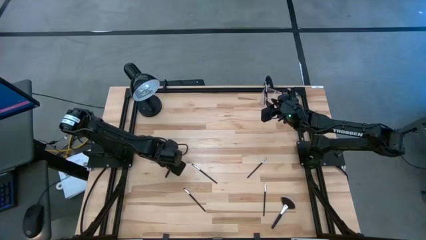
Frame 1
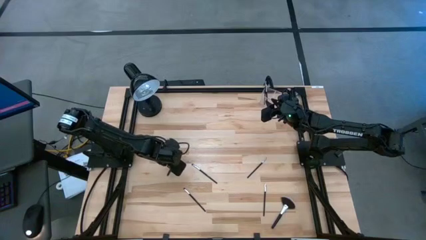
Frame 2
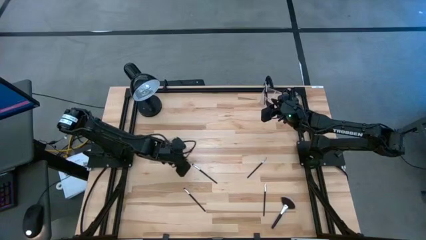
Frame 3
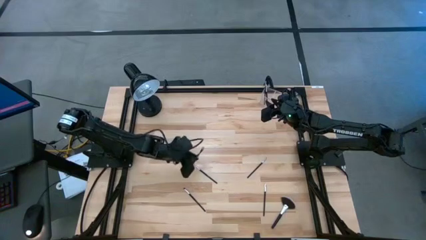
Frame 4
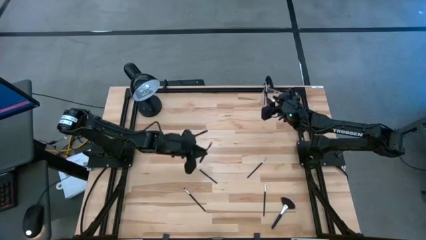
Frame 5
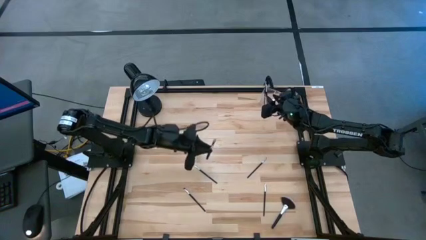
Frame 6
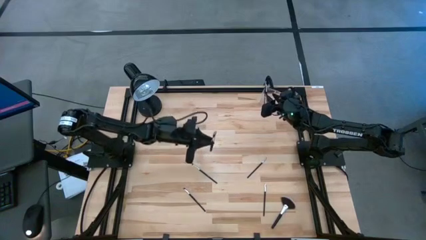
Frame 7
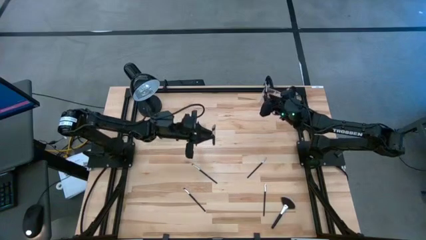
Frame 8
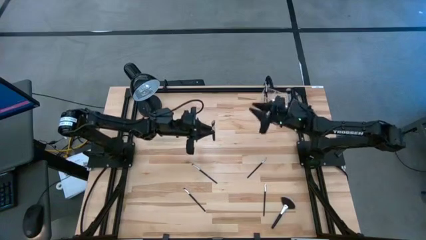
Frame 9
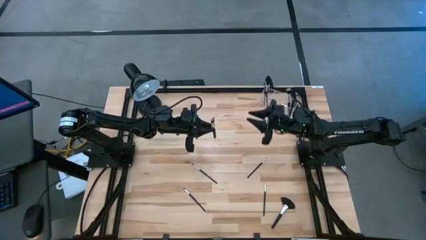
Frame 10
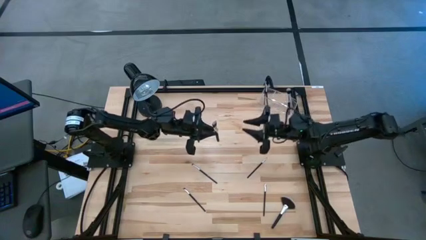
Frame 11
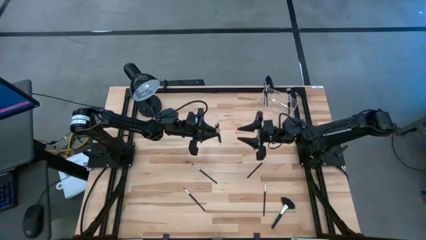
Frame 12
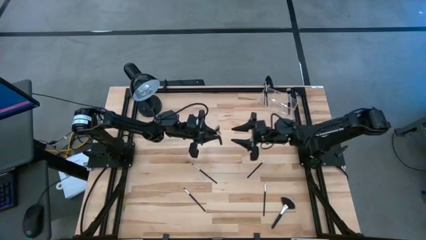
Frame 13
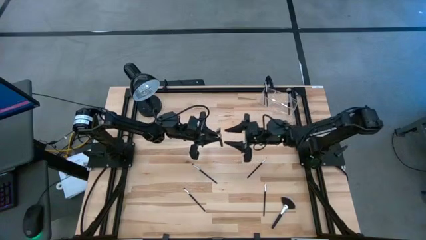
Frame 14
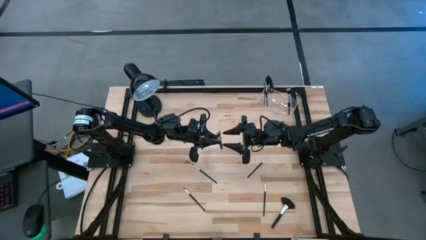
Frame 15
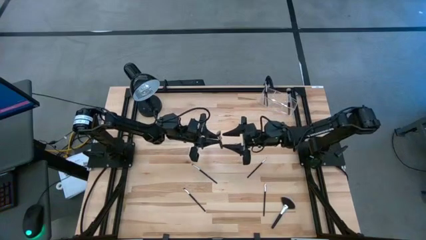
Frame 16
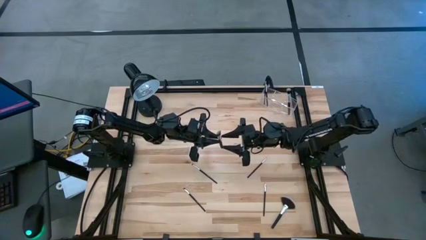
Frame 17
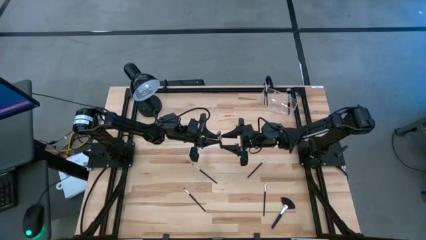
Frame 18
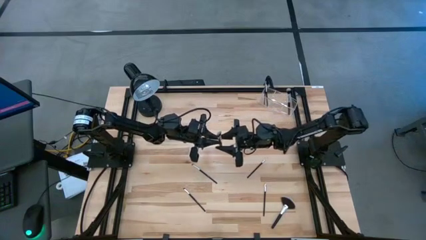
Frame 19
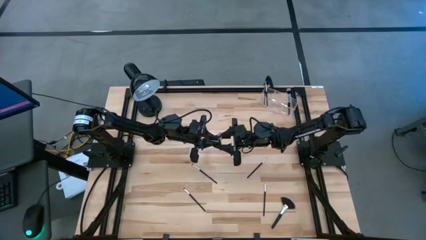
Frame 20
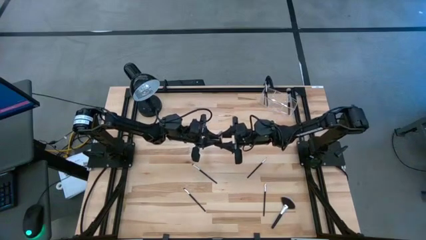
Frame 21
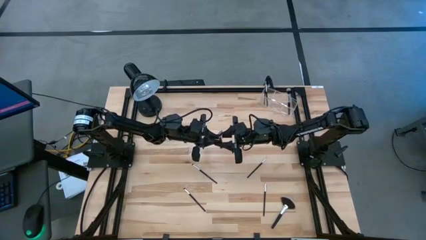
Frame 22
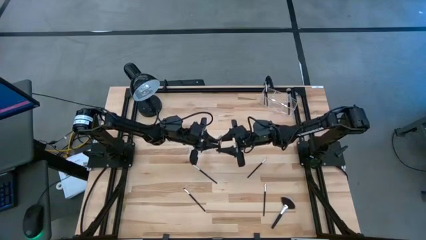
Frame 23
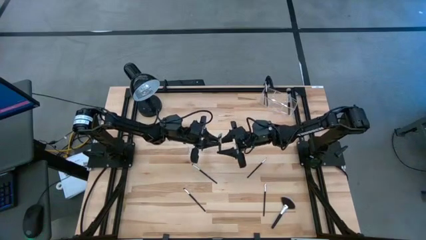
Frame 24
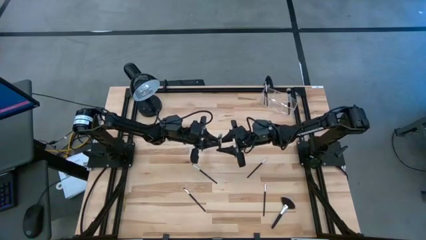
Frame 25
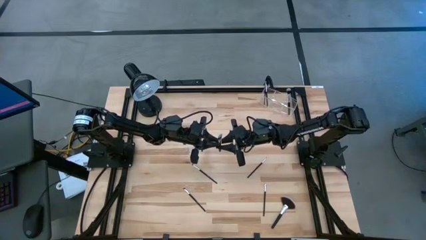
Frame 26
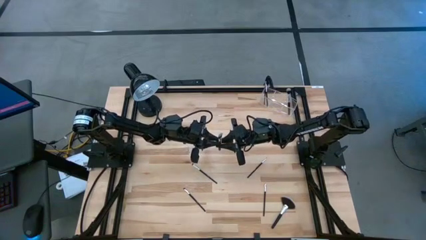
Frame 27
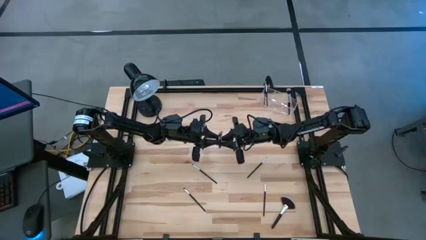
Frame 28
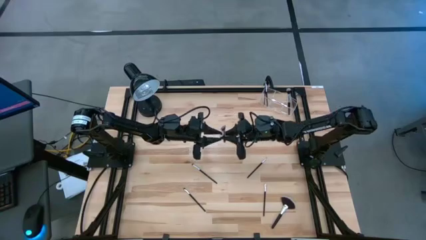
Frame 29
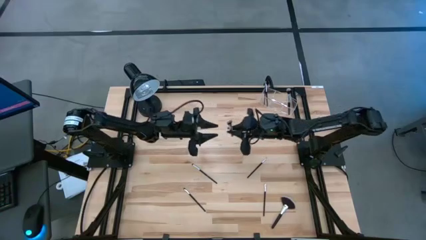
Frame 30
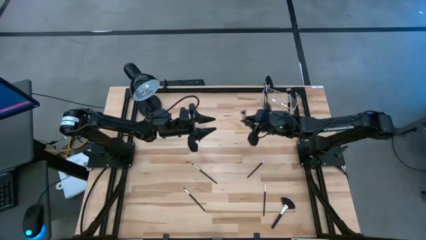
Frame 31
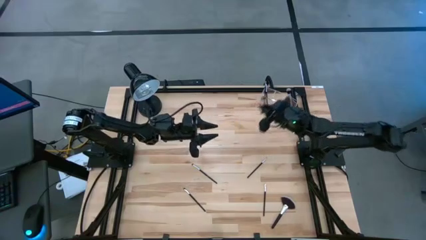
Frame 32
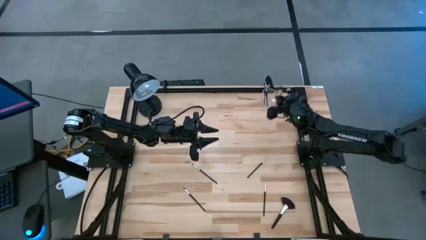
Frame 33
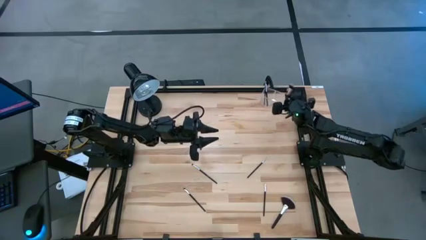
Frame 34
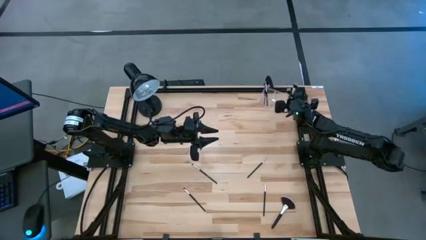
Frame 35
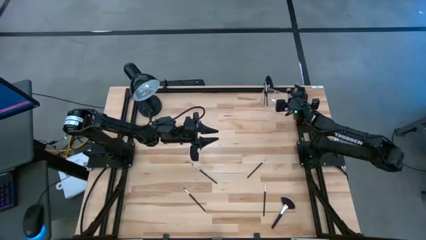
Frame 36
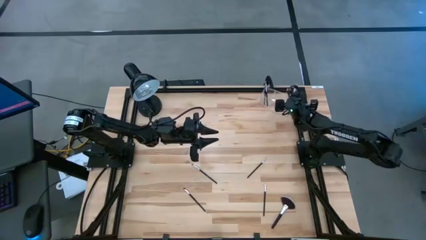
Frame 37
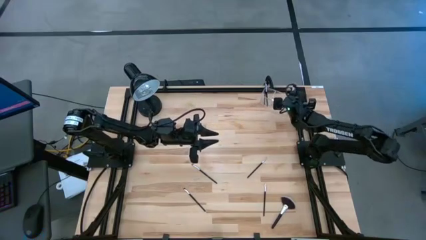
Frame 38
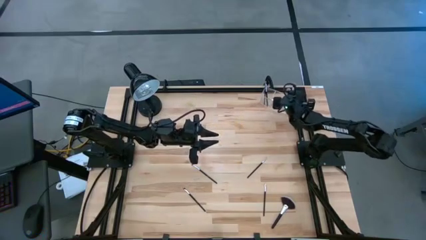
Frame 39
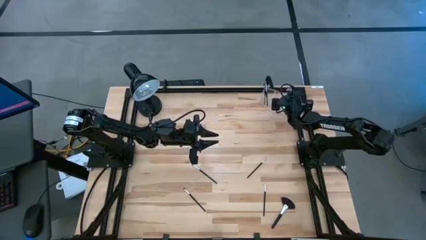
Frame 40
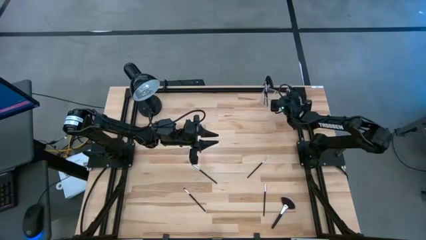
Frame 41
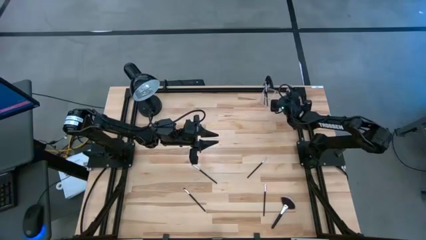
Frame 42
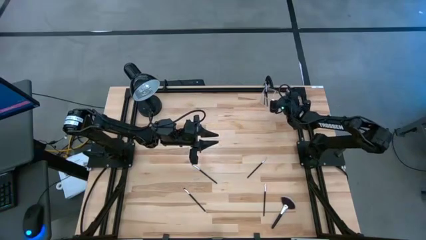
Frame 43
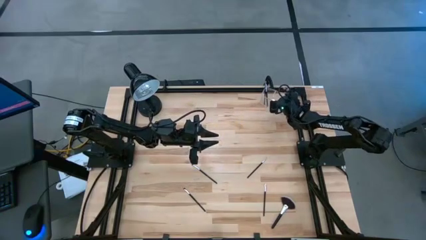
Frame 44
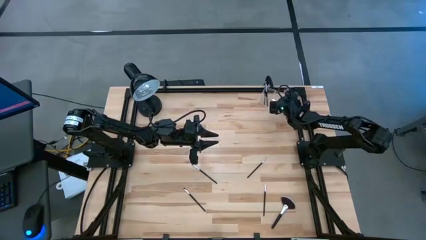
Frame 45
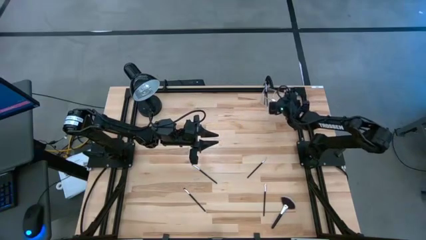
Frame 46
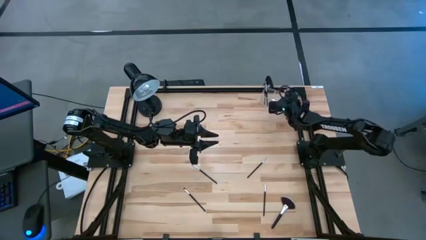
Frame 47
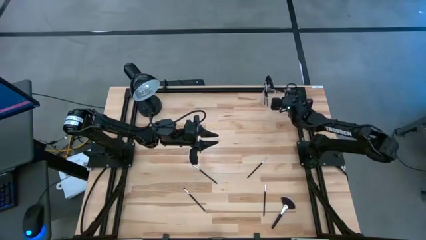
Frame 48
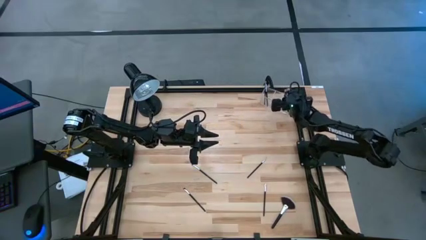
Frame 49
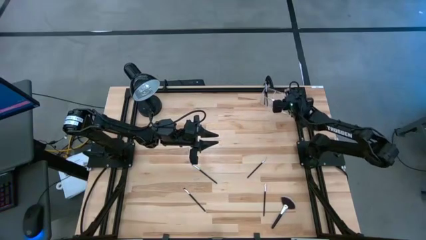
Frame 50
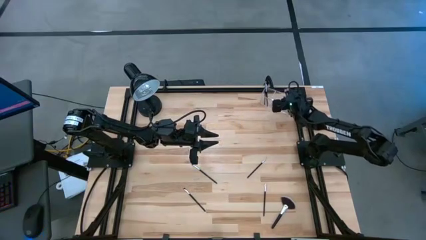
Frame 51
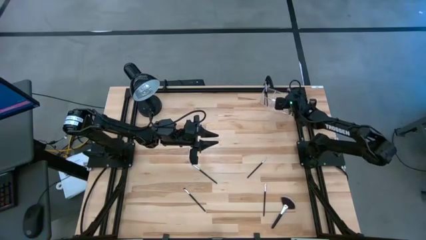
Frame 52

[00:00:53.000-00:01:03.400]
Task: Sort items
Put the powder brush into the transparent organizer

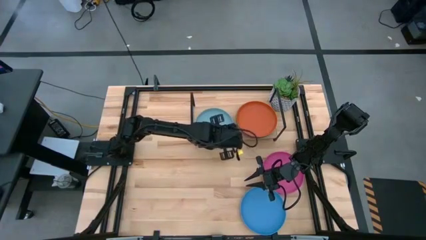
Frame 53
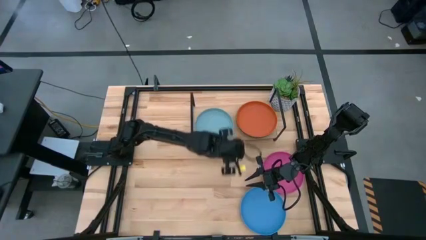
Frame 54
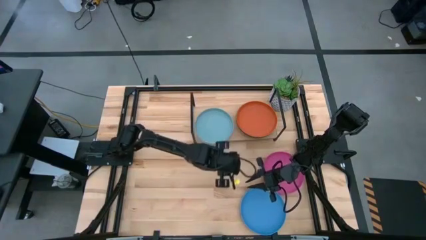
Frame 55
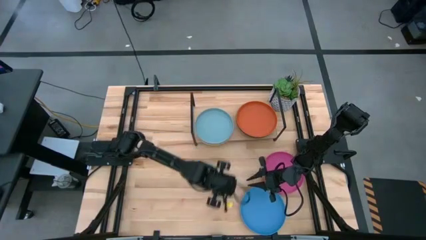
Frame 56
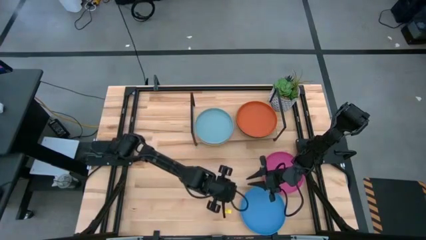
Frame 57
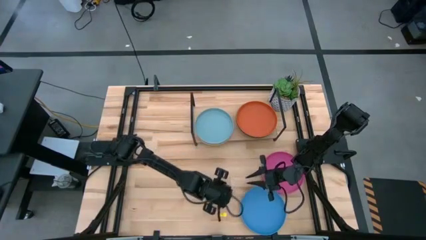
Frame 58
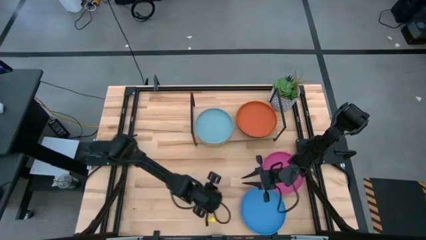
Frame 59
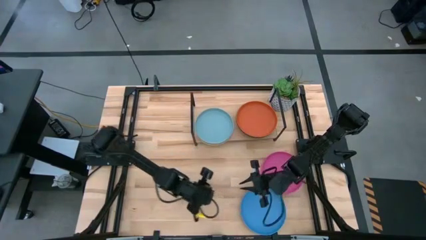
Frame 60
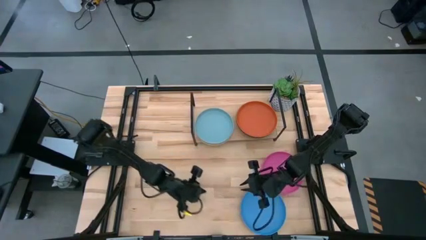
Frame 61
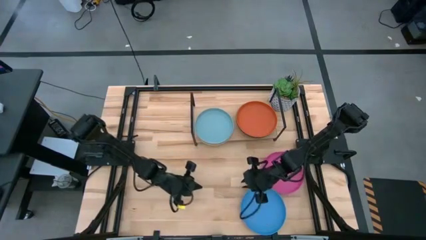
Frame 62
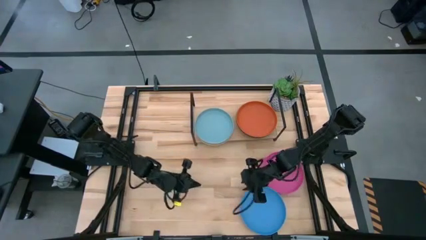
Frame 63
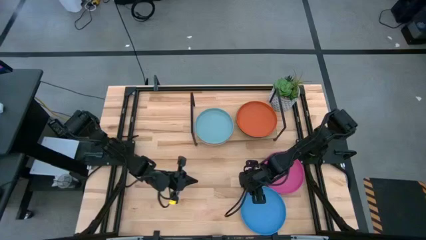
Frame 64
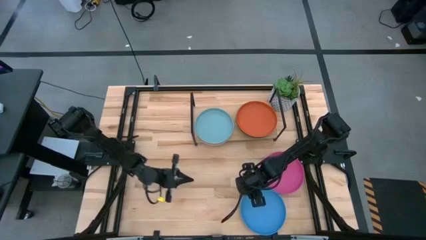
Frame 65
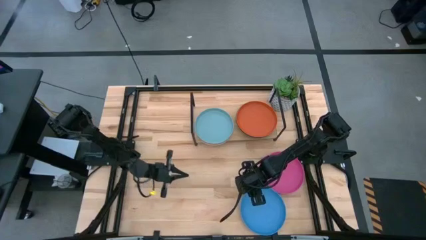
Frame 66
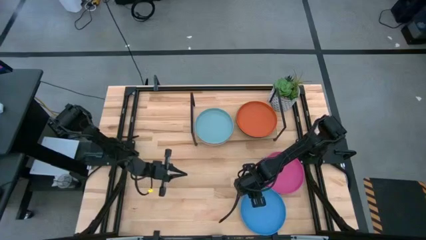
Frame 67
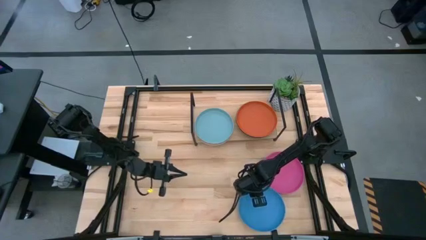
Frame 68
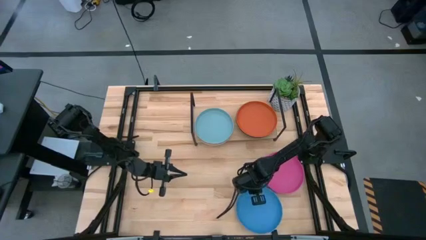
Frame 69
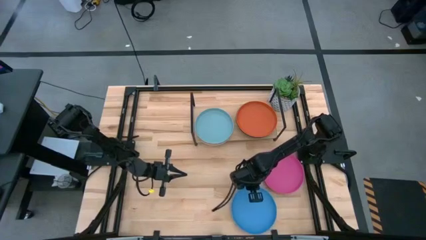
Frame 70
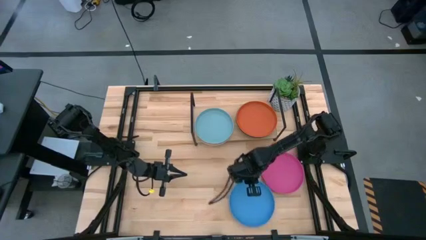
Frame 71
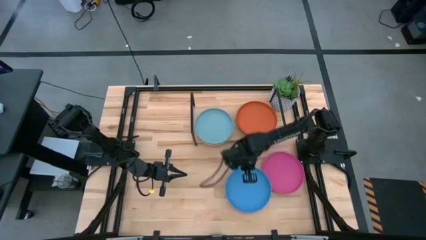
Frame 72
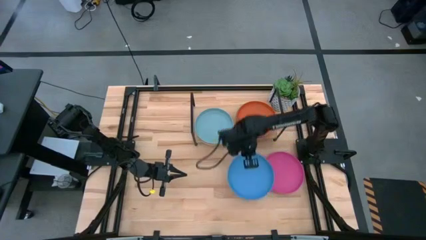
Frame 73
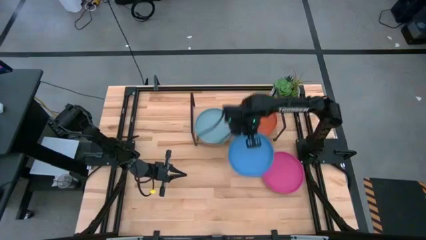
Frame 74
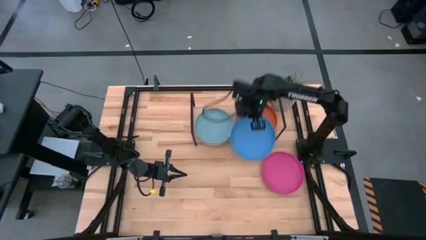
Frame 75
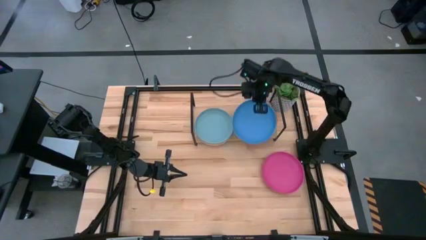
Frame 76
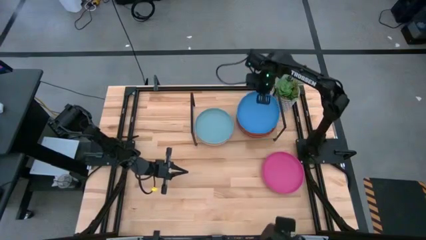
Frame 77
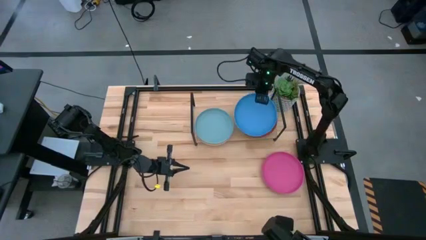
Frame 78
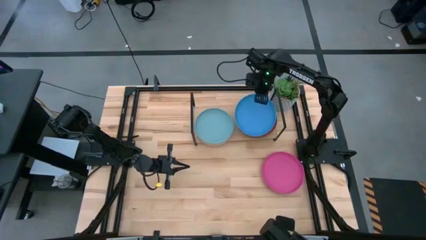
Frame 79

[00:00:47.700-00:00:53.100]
Task: Place and stack plates onto a shelf
Stack the blue plate on top of the orange plate on the shelf
